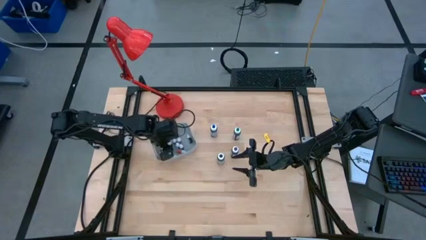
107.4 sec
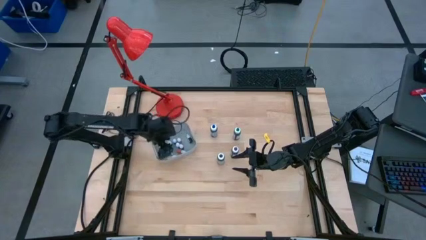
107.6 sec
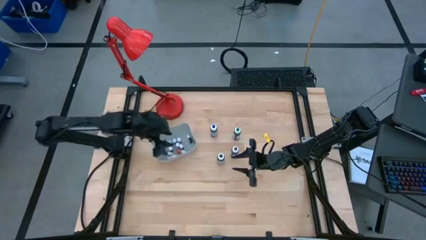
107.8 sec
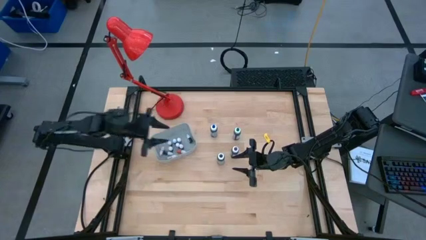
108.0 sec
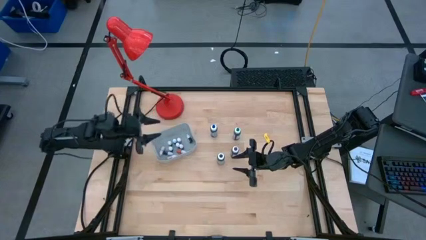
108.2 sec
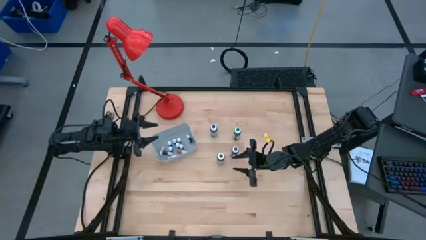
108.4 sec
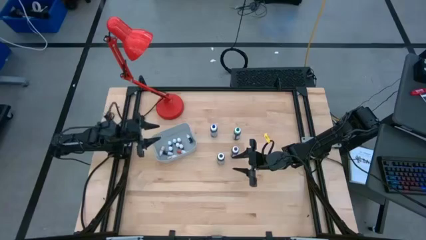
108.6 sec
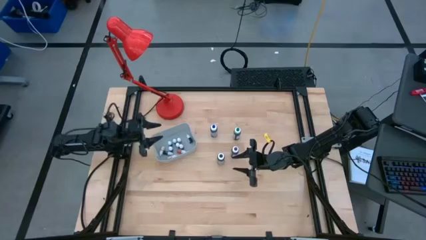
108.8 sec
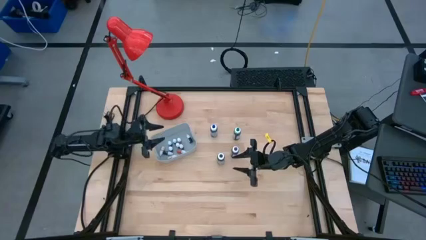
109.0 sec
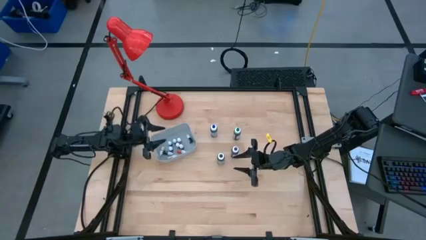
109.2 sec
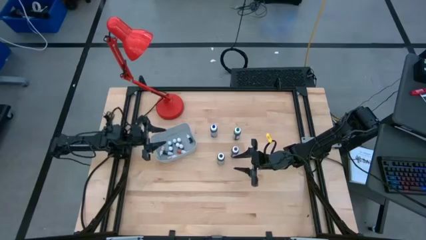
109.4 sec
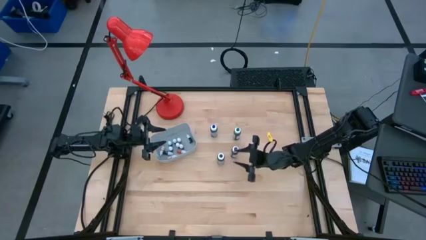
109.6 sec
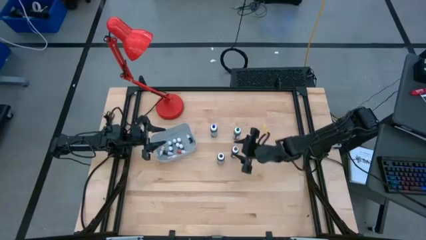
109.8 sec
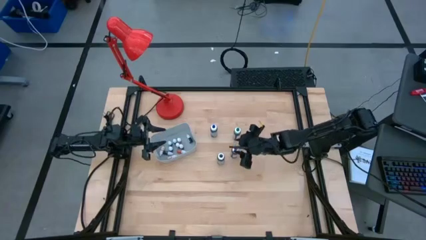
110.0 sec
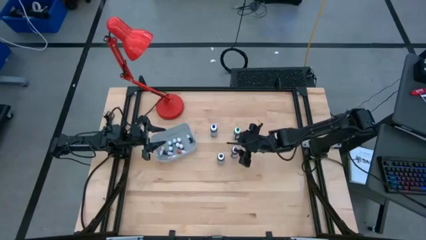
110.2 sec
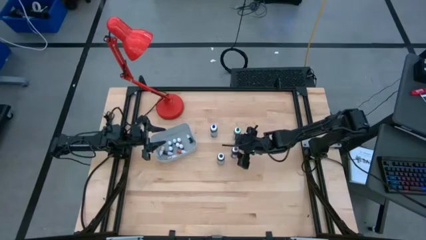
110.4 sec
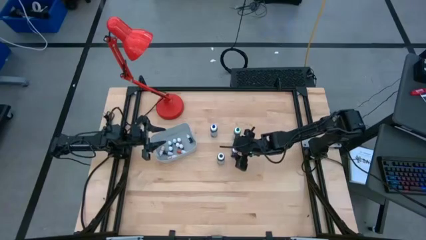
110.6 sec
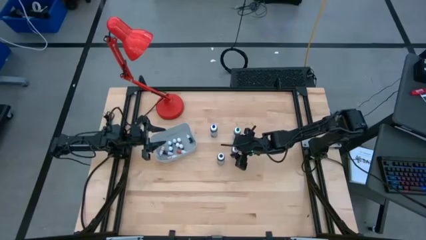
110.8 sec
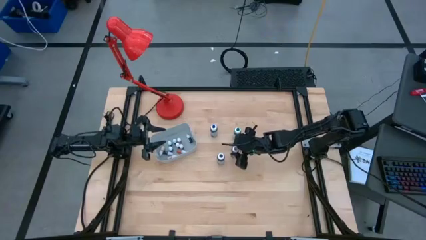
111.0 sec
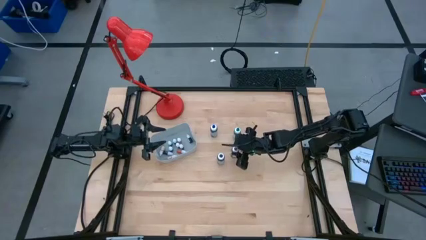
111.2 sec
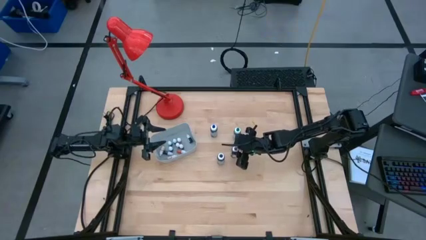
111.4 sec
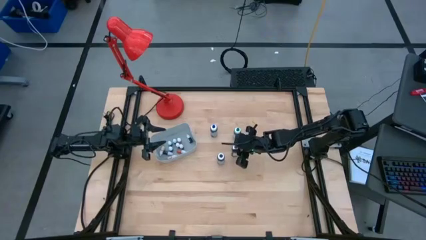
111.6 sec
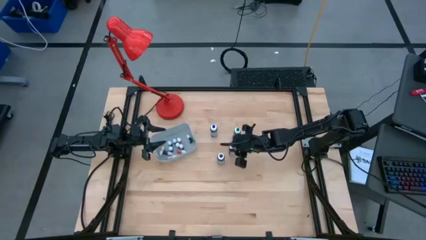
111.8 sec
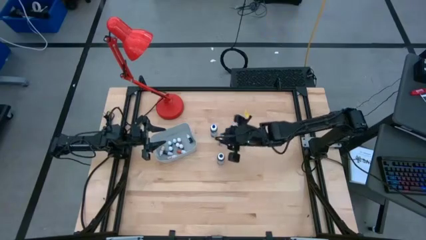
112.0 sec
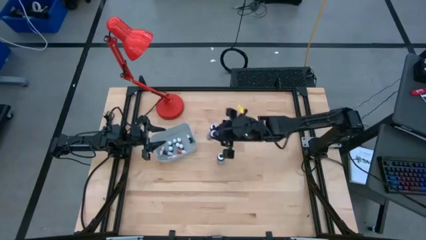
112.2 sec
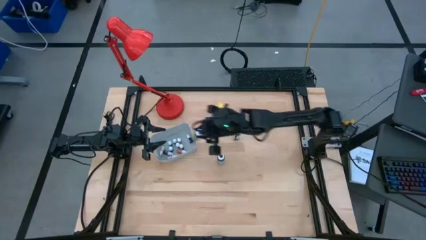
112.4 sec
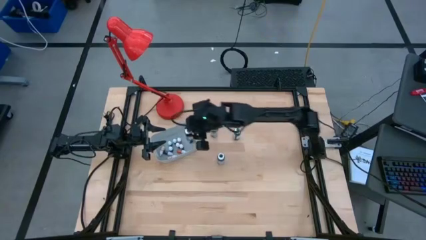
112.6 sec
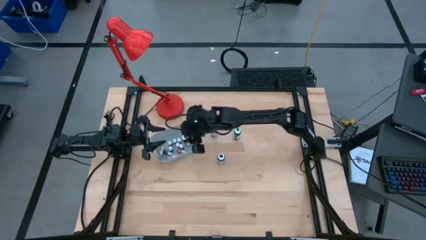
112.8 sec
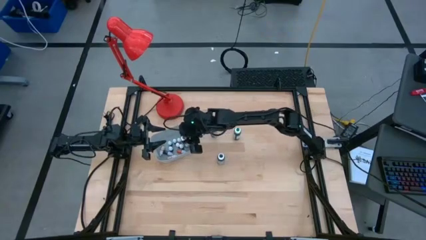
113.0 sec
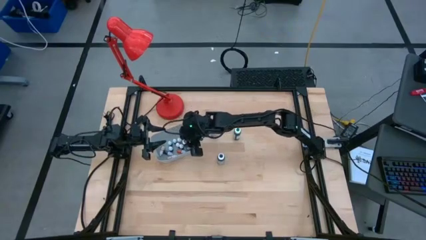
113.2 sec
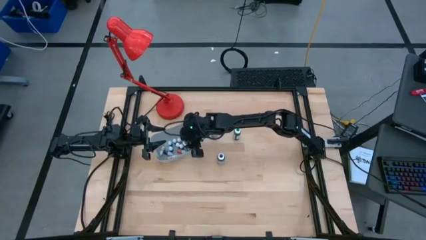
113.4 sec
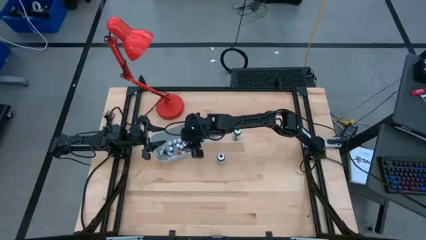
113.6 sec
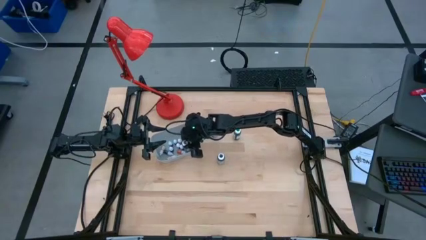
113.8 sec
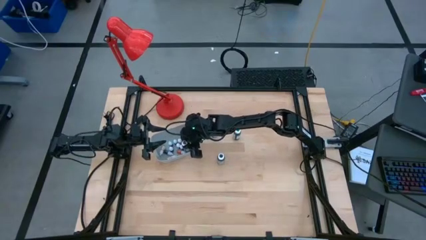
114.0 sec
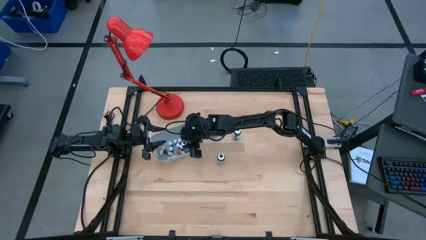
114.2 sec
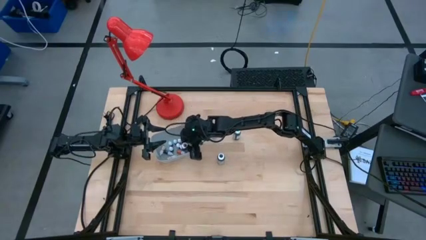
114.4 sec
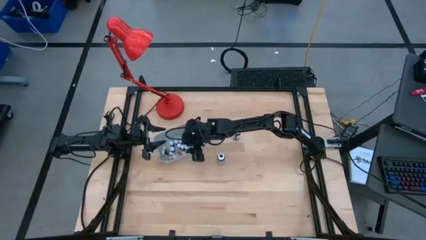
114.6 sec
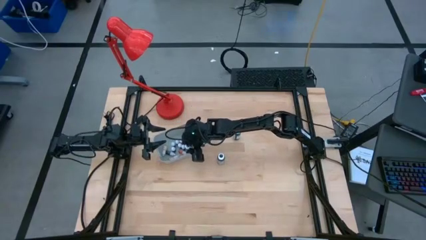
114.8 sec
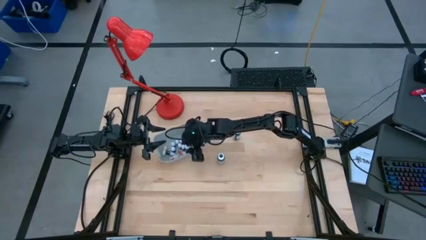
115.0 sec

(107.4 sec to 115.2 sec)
Task: Pick & Place food coloring
Put the big purple coloring bottle into the gray container

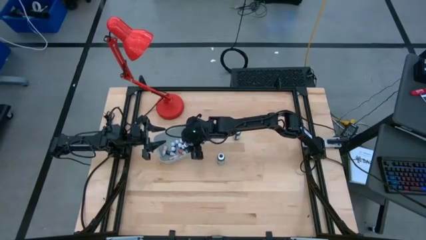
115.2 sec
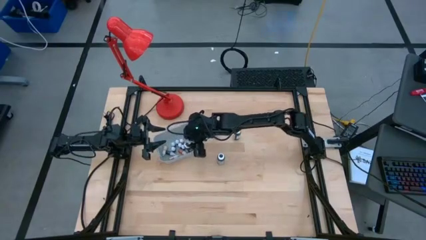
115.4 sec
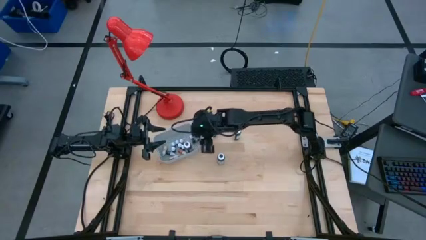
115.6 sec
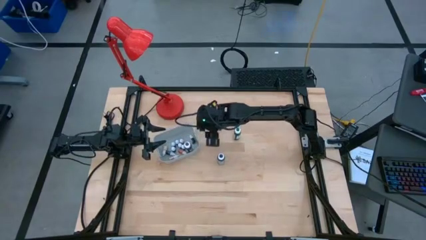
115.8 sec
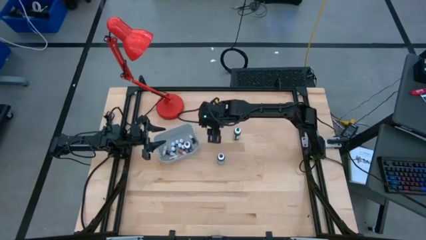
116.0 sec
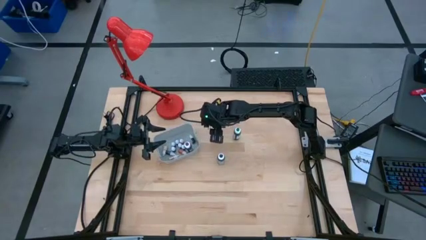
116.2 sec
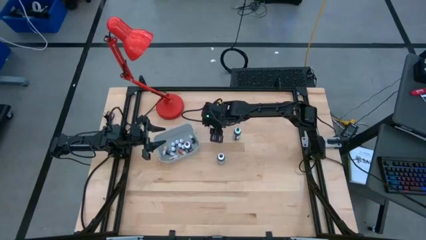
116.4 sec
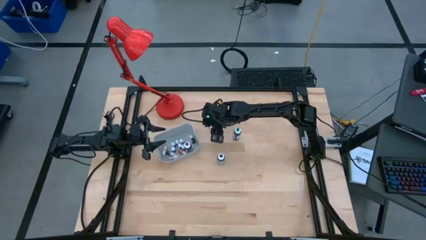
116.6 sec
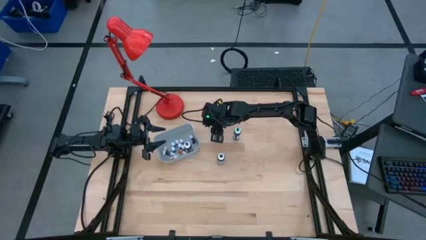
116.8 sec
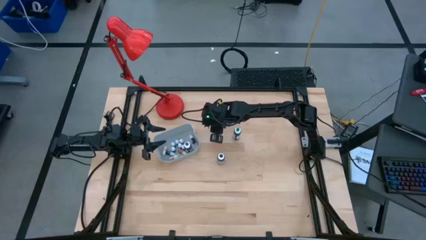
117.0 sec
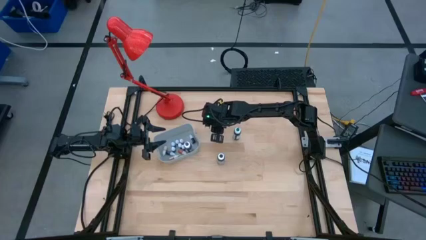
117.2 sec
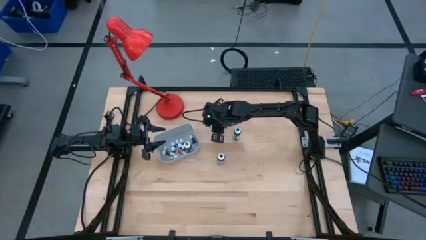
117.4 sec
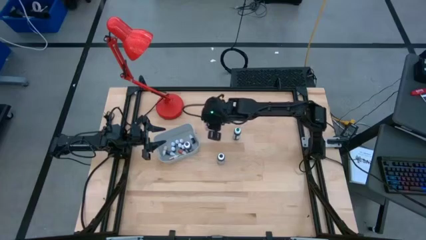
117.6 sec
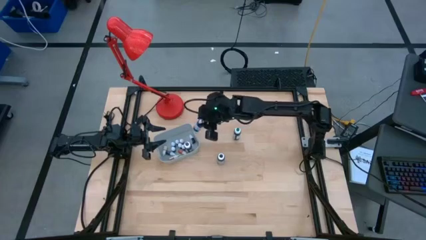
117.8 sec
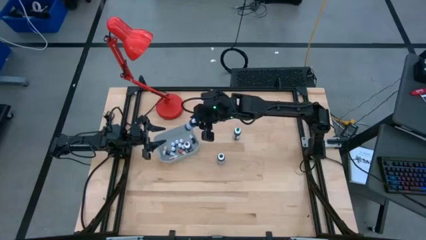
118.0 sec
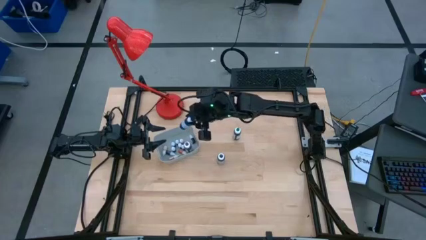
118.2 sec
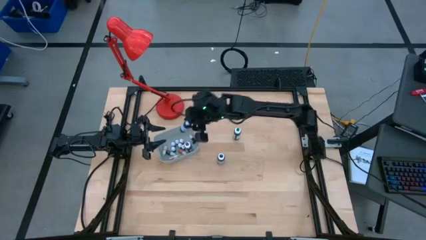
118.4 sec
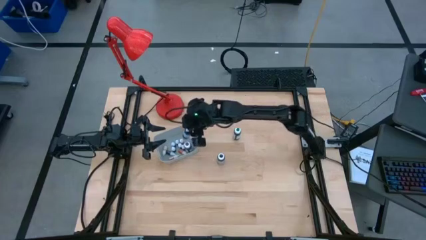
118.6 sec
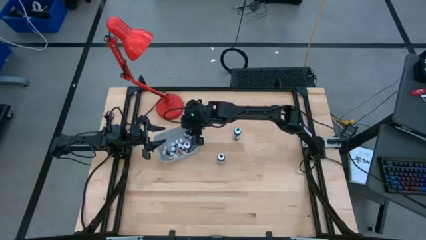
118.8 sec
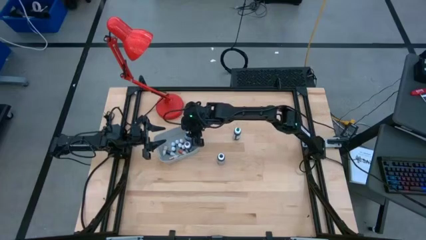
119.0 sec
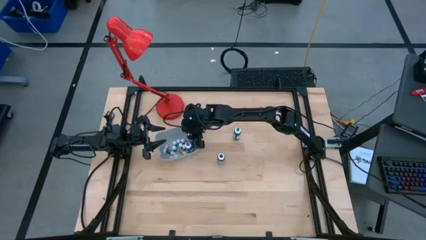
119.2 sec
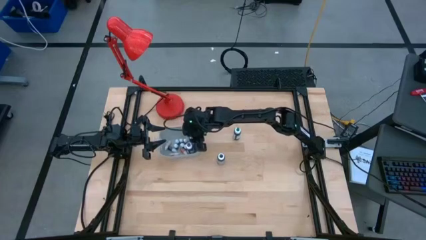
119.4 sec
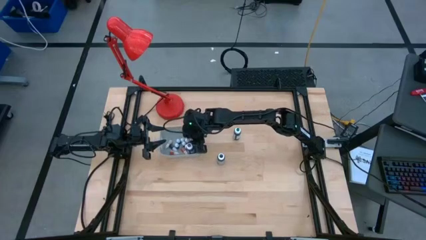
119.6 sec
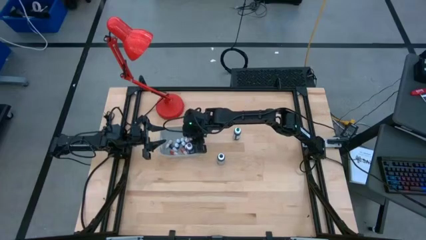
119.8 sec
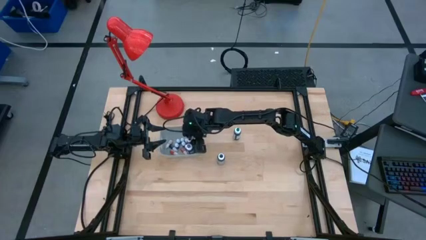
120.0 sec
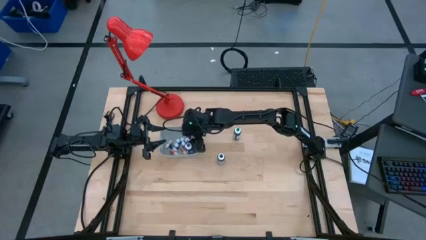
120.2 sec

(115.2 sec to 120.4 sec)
Put the big blue coloring bottle into the gray container
